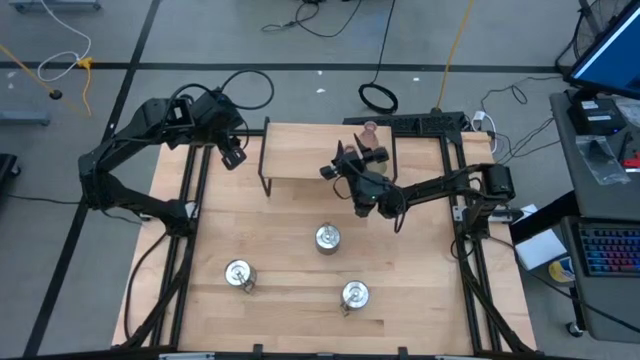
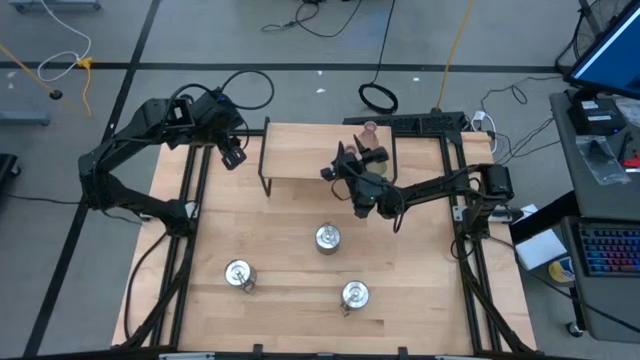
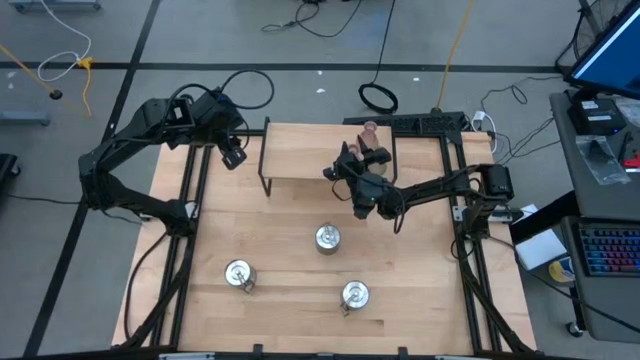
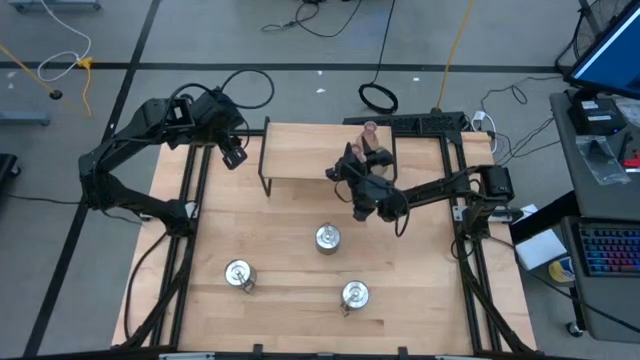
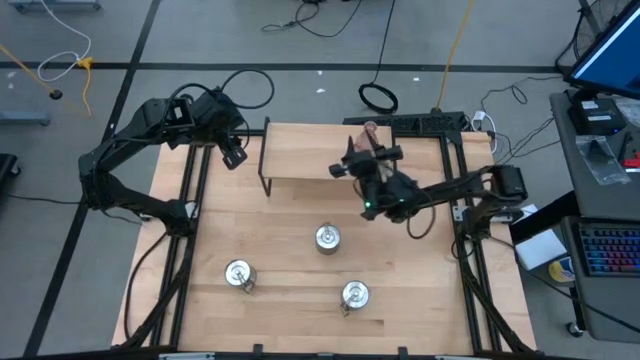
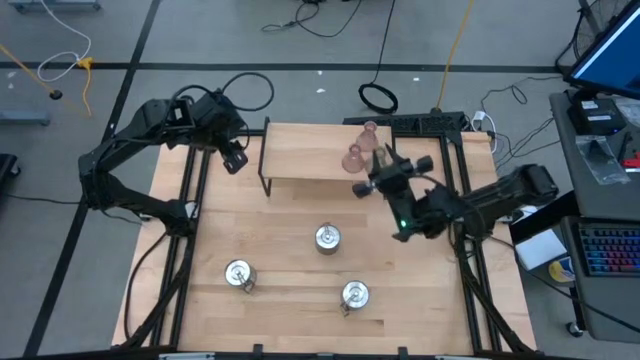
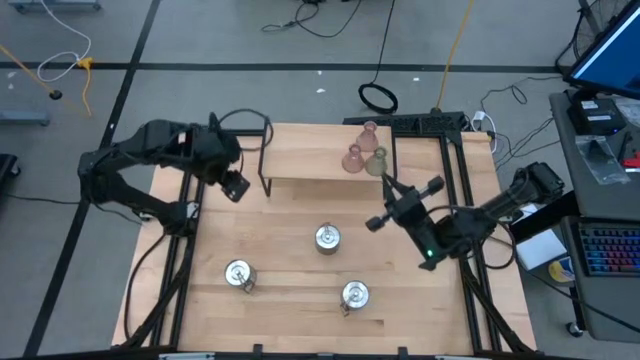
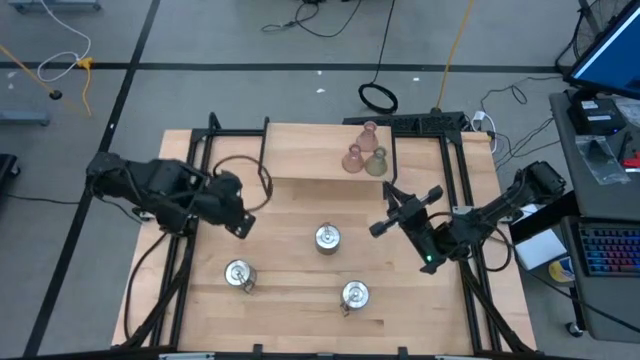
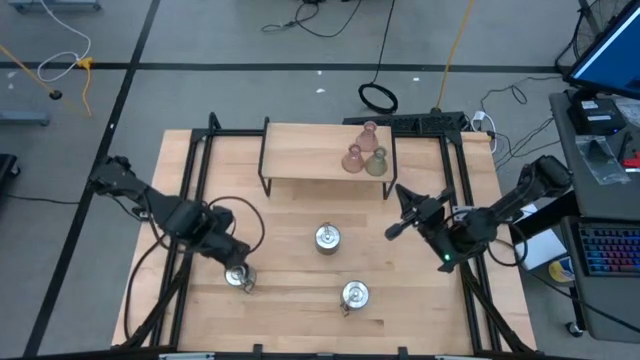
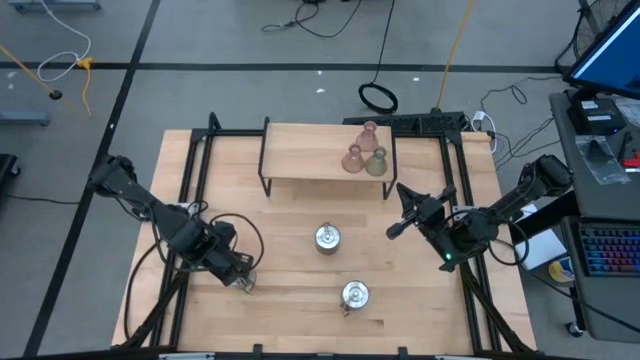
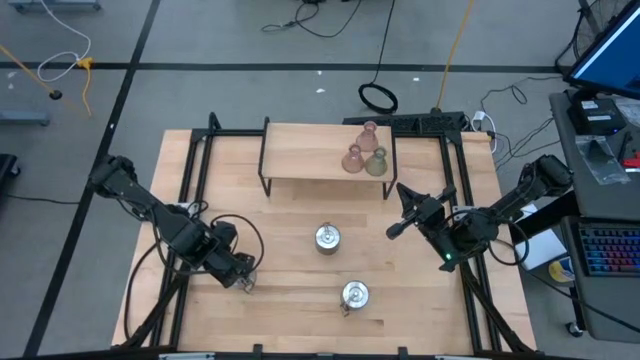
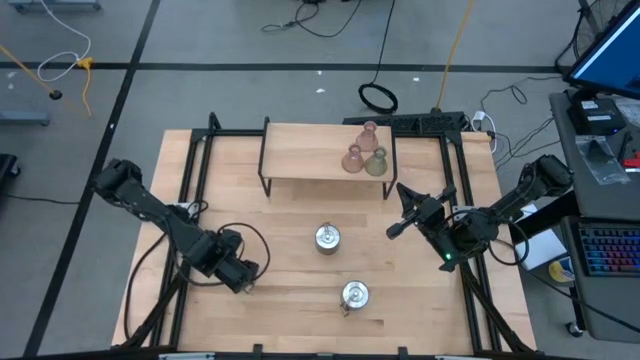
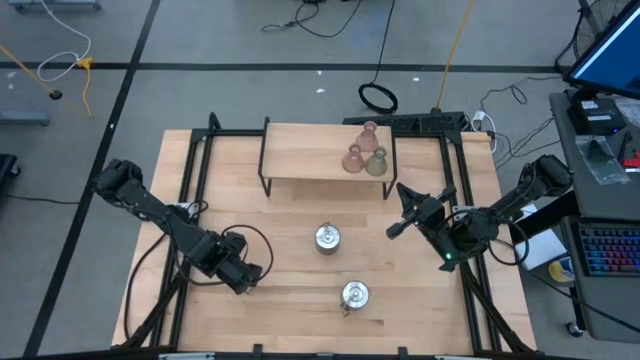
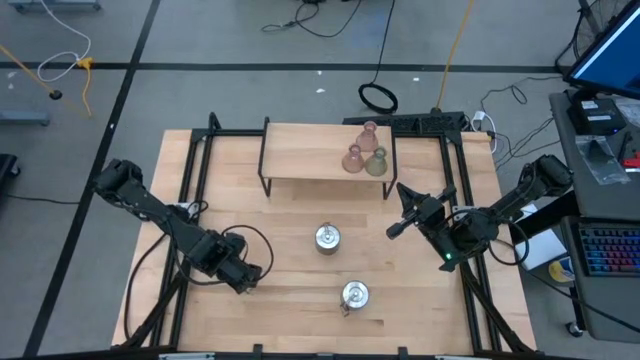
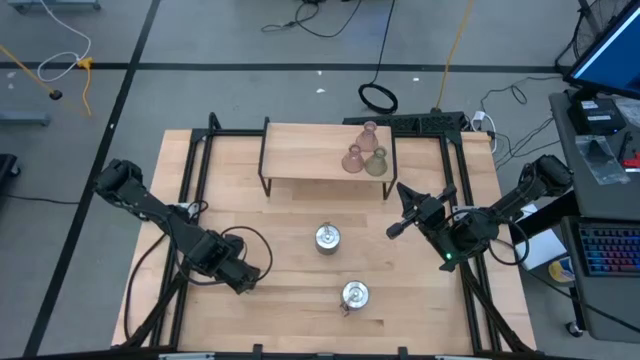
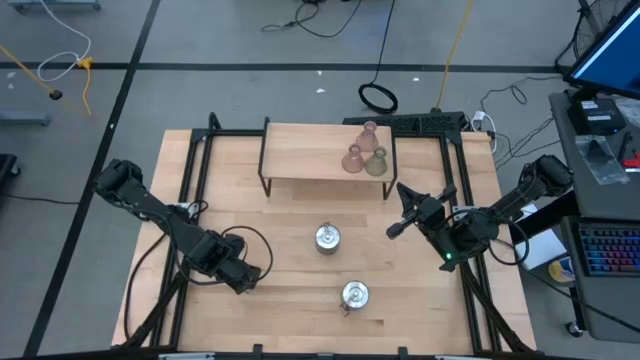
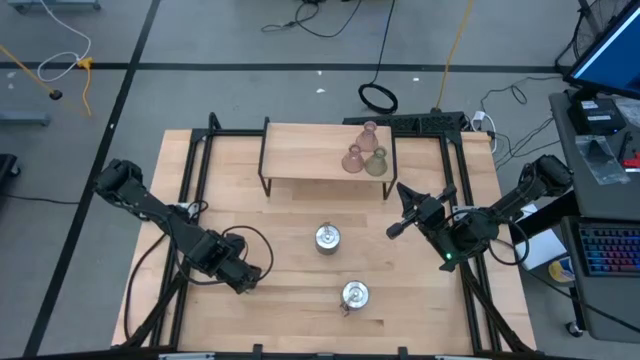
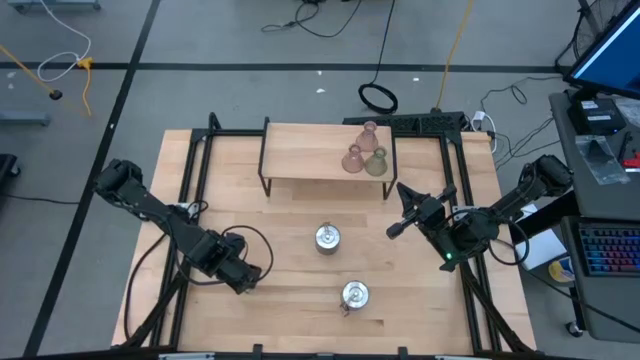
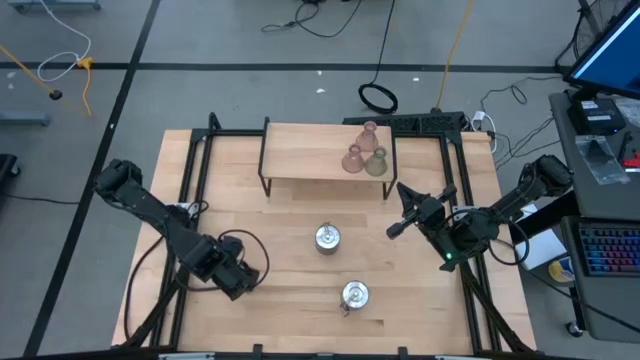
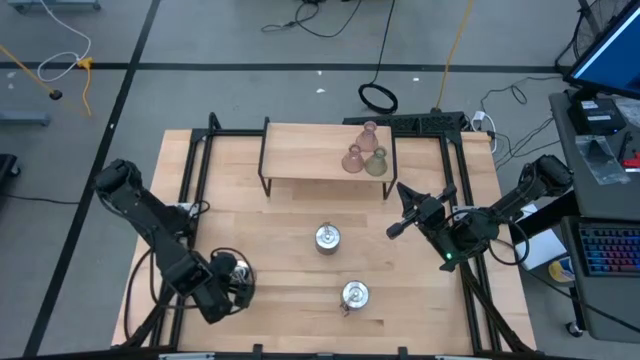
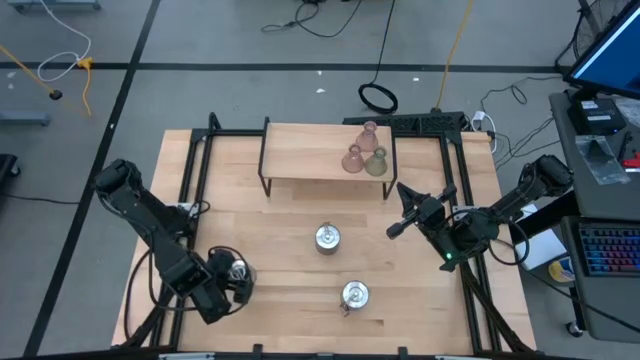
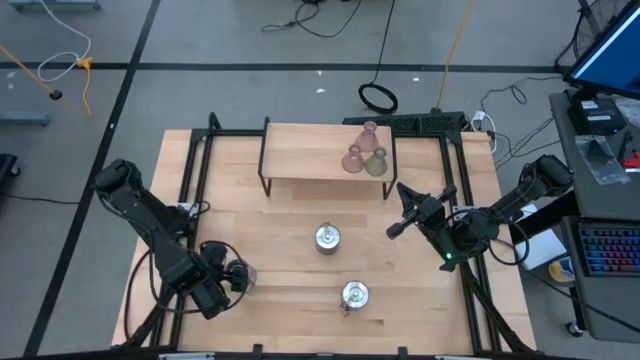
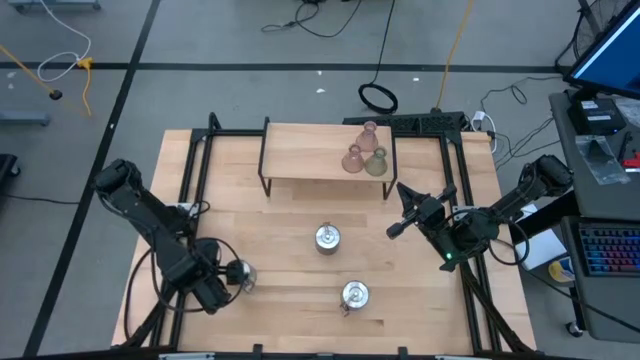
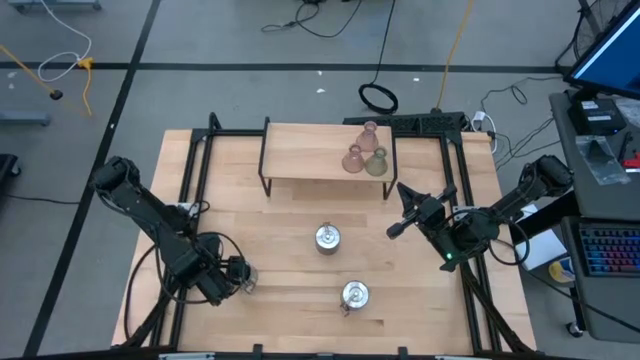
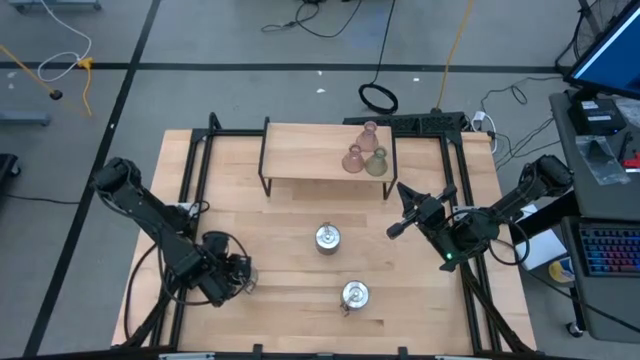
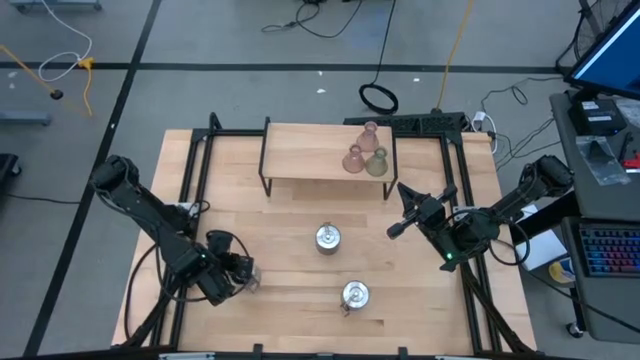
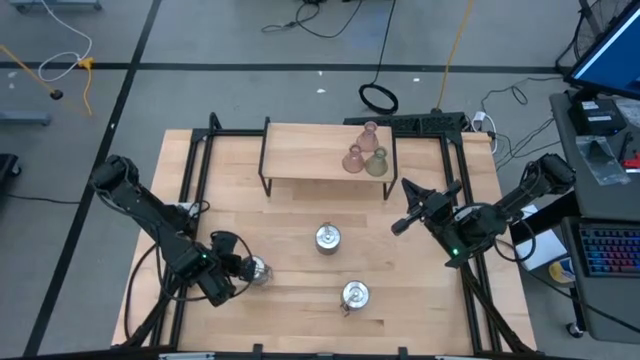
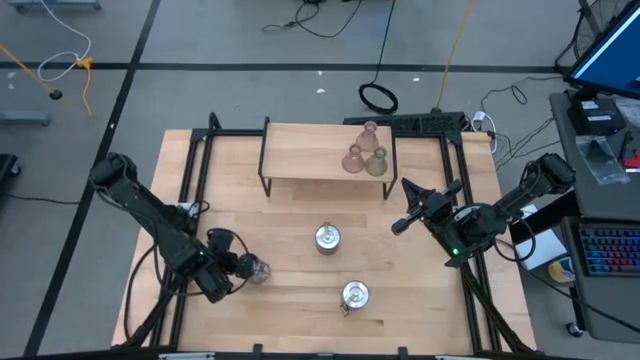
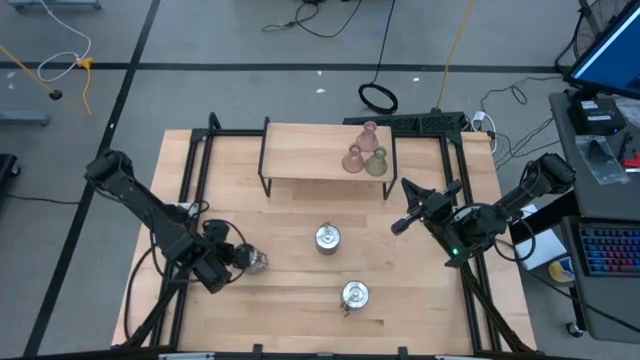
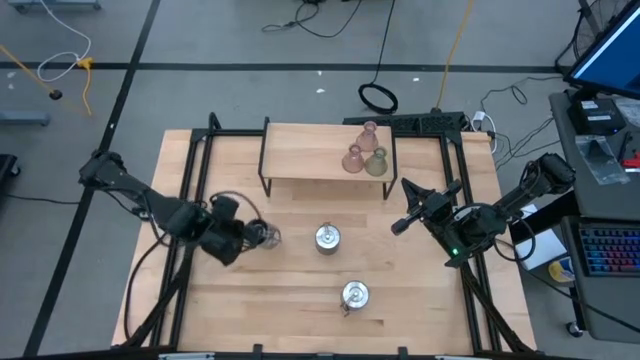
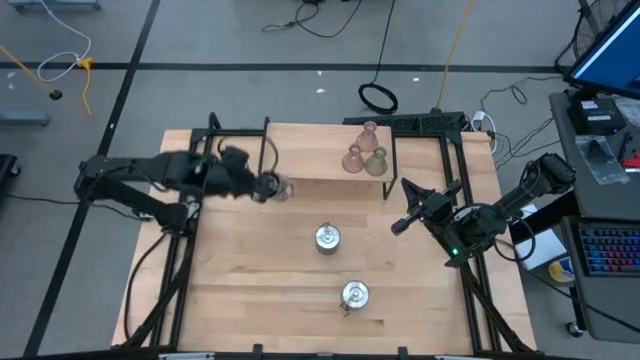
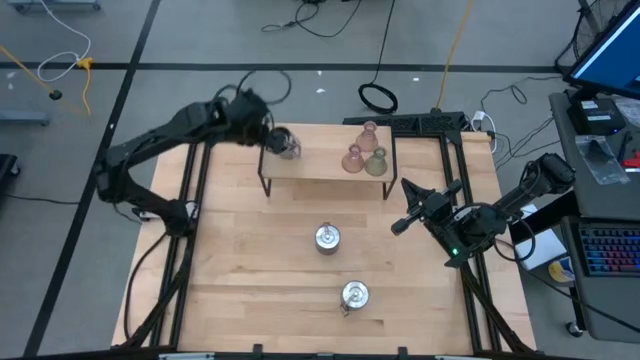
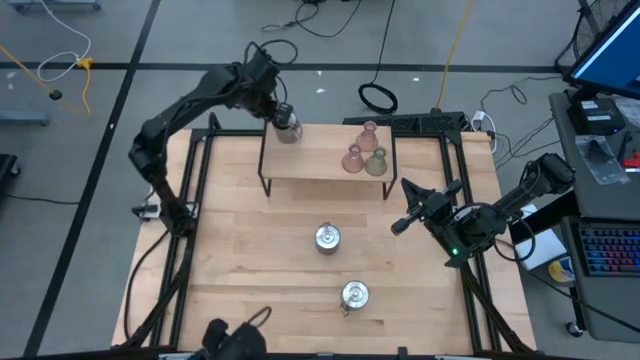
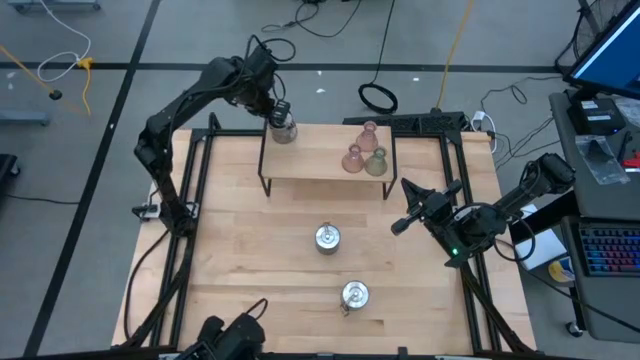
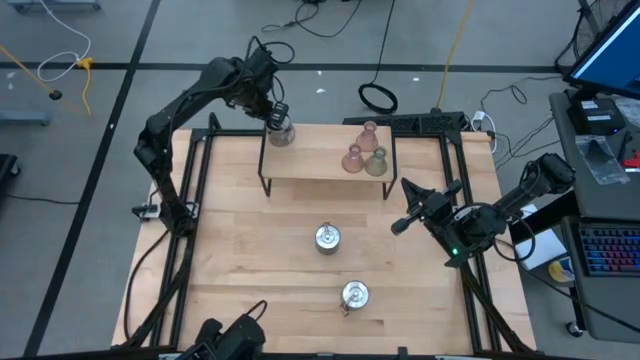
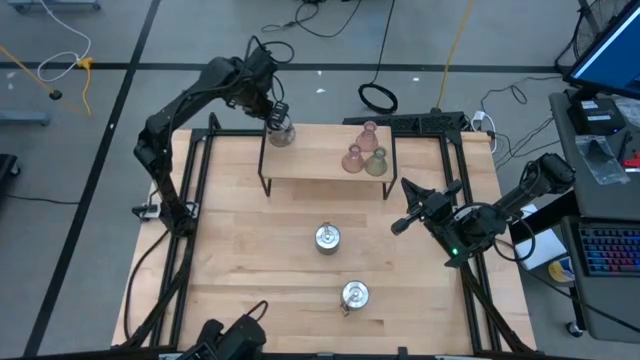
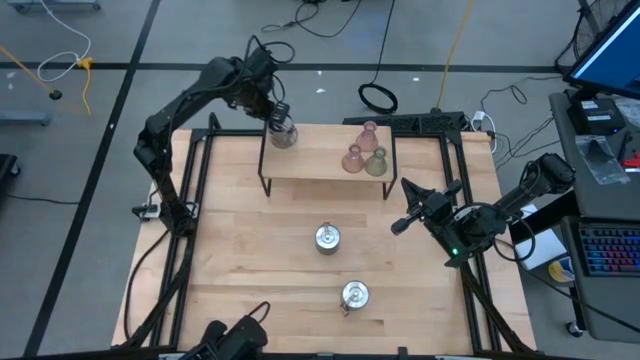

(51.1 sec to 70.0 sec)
Task: Pick & Place candle stick holders
Put the left scented candle on the shelf
